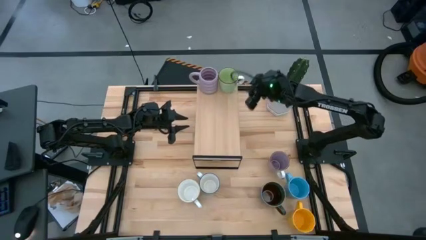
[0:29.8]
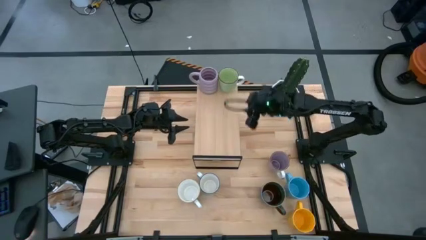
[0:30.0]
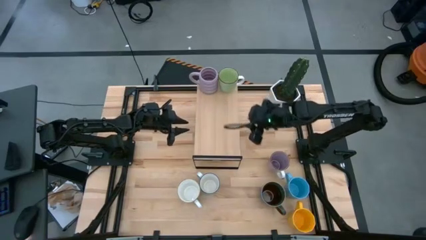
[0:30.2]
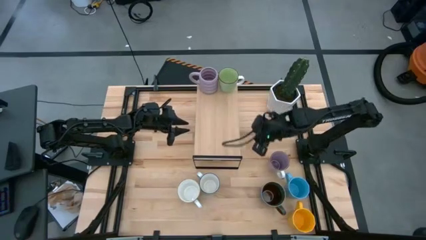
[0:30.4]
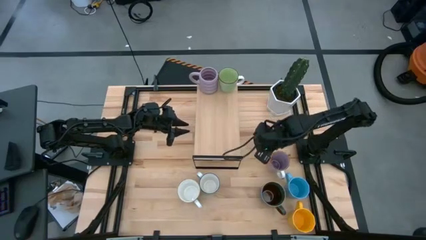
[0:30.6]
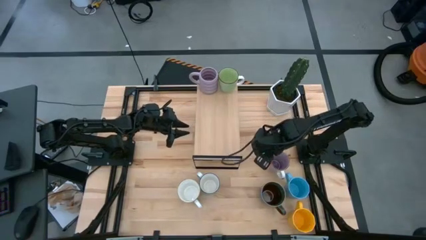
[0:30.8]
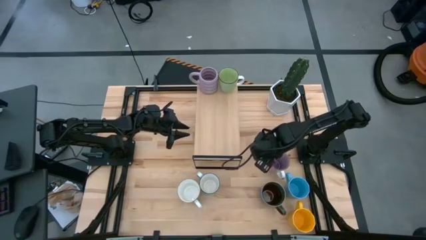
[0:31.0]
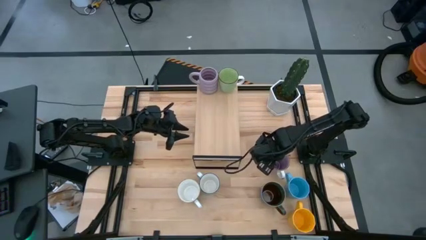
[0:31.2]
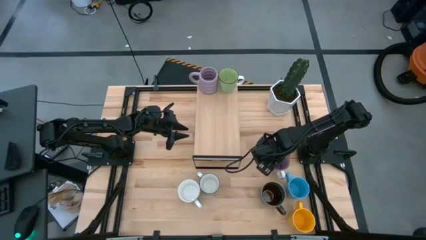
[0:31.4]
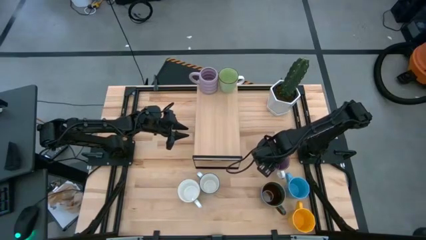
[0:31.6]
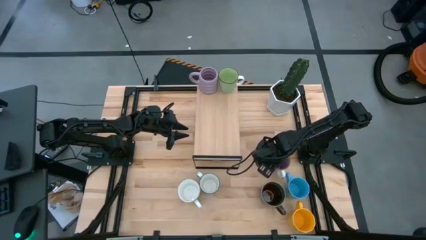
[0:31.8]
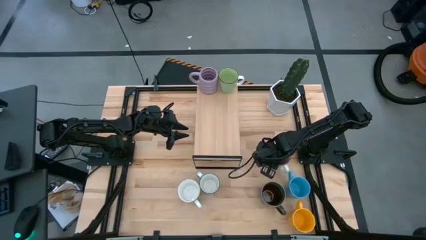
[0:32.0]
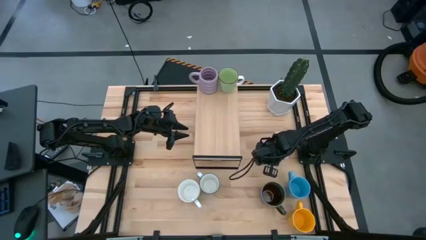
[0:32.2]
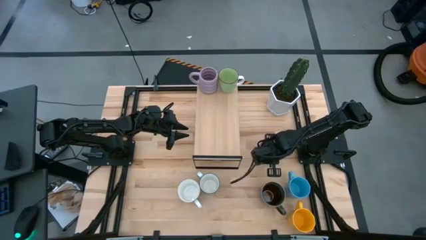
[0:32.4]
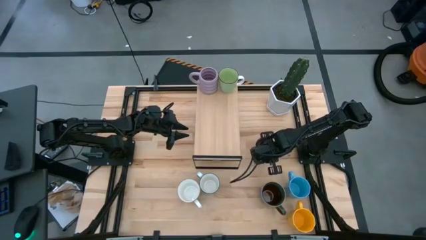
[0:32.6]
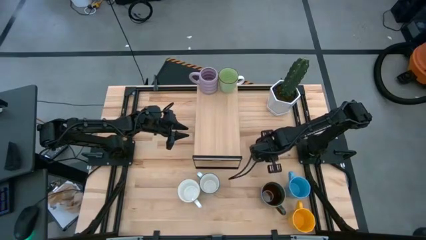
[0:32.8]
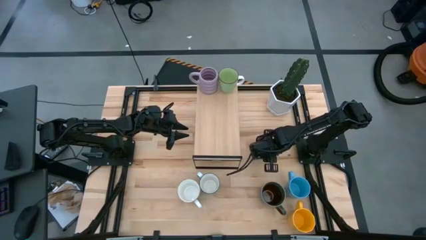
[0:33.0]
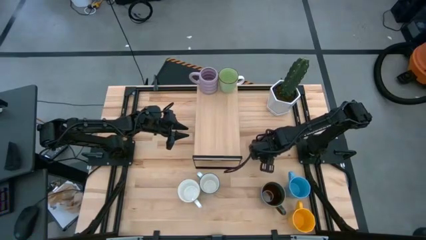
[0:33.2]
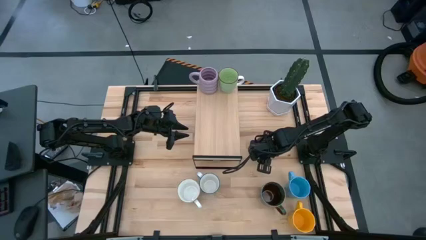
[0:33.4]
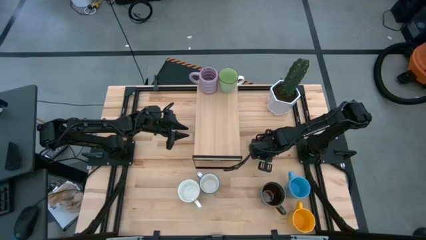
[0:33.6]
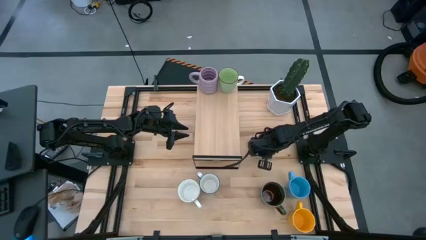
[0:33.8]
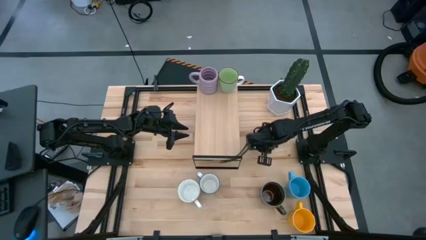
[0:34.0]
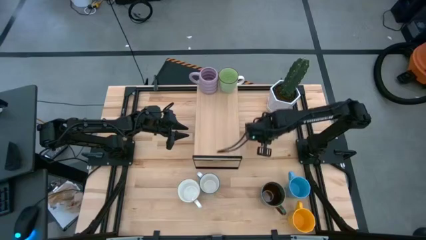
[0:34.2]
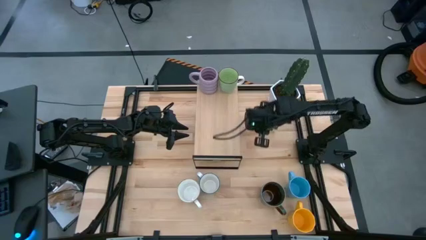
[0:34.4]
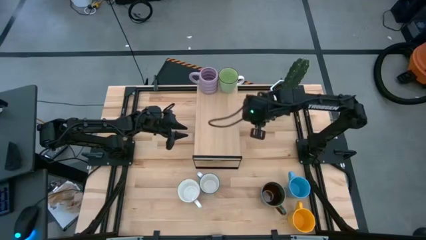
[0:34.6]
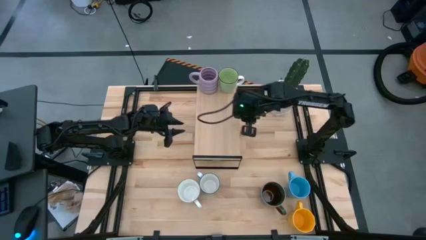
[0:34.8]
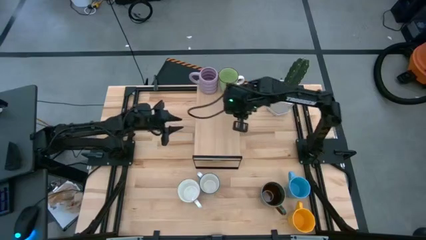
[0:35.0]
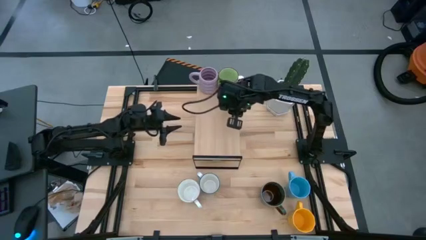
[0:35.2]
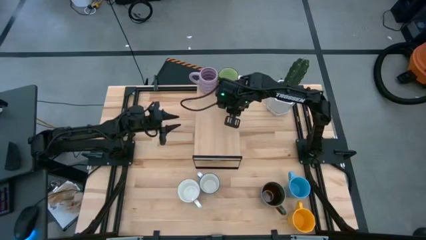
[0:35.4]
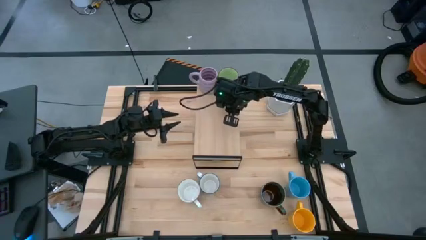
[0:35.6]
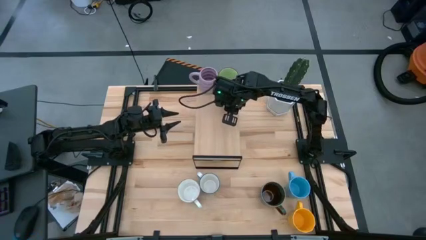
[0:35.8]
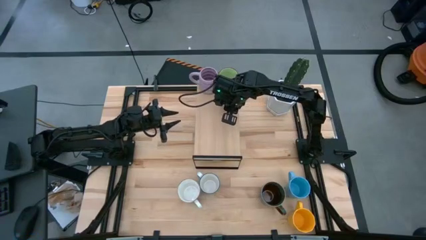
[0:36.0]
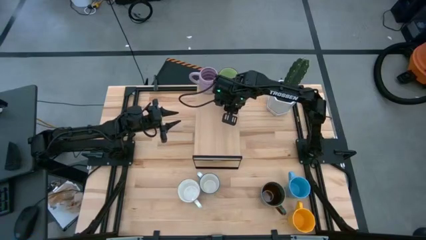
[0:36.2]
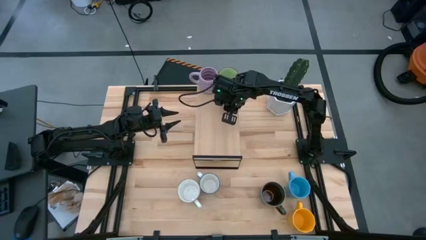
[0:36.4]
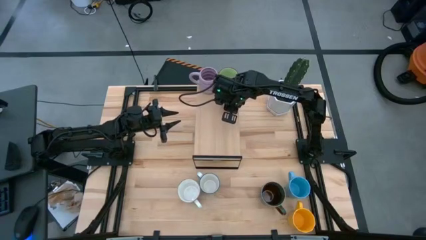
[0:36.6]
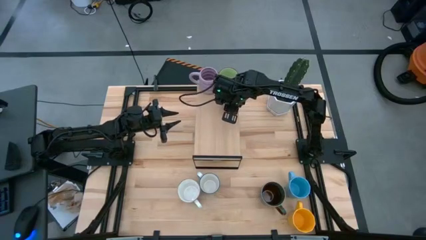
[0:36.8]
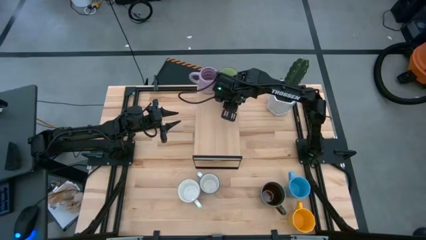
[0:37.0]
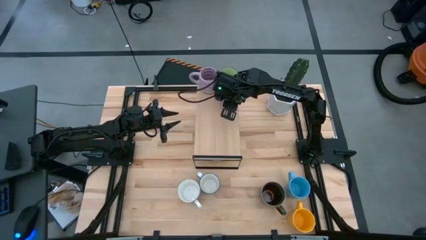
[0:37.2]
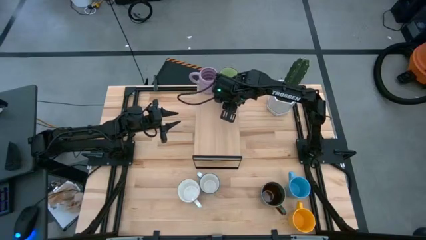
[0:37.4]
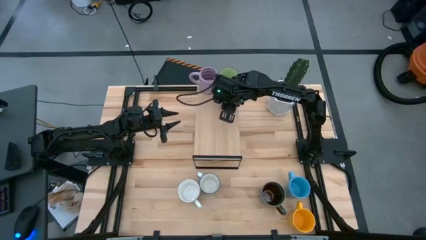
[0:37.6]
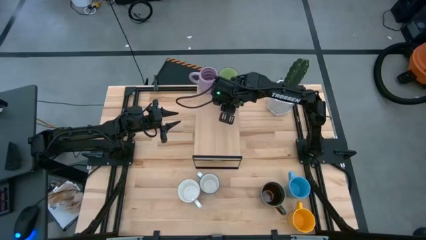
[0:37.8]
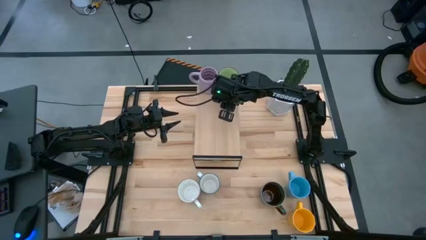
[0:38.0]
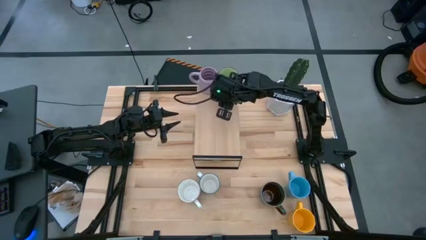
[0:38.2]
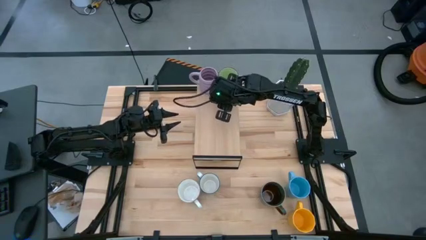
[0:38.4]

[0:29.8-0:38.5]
Task: Place coffee mugs
Put the violet mug on the shelf

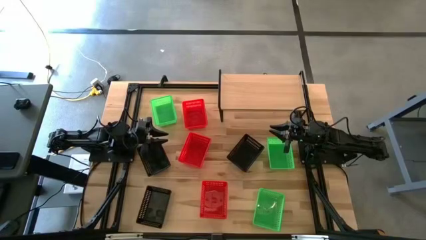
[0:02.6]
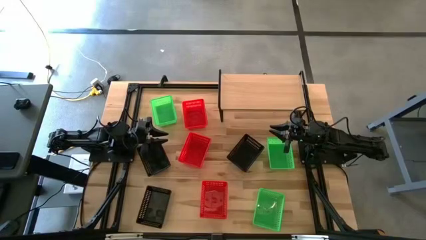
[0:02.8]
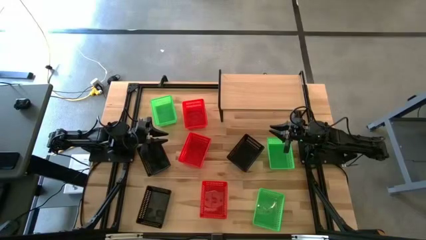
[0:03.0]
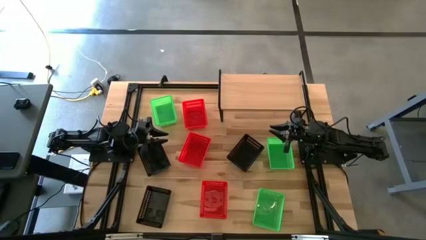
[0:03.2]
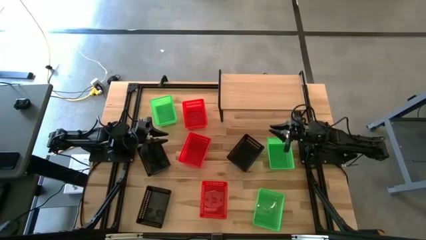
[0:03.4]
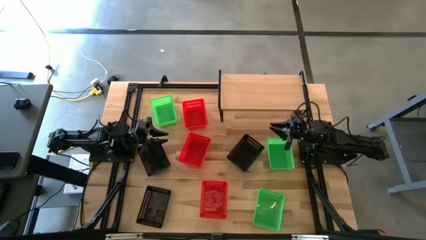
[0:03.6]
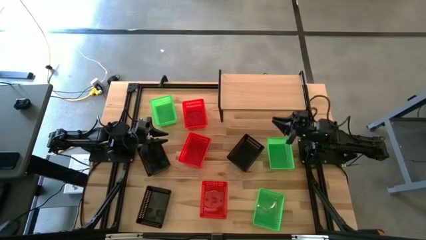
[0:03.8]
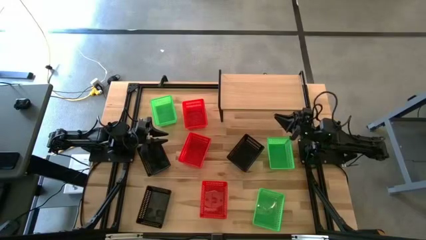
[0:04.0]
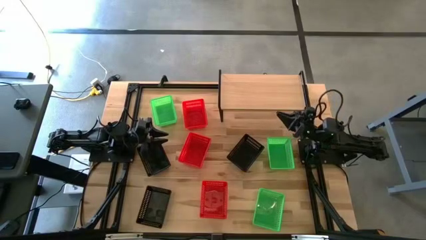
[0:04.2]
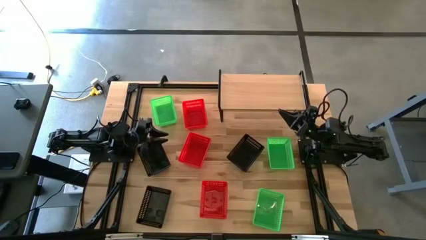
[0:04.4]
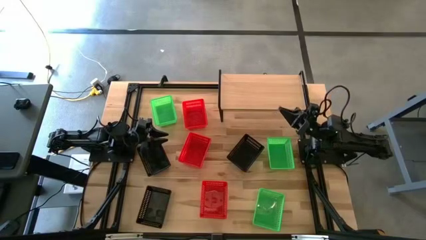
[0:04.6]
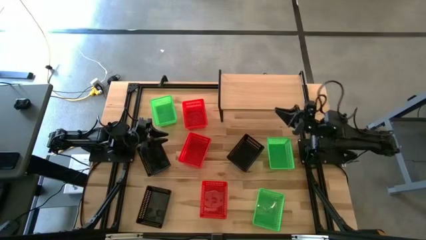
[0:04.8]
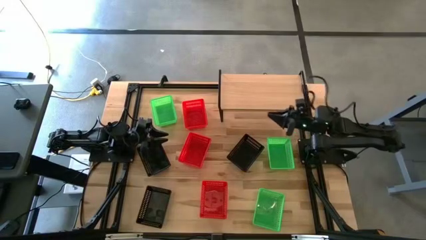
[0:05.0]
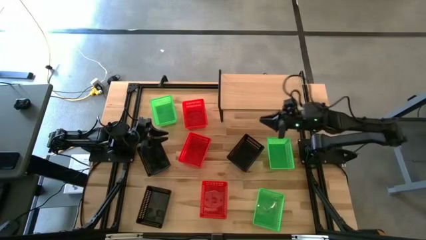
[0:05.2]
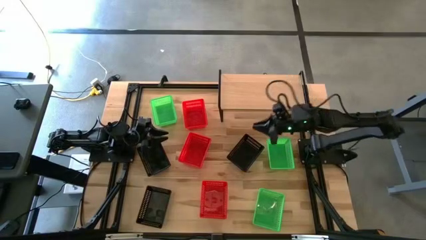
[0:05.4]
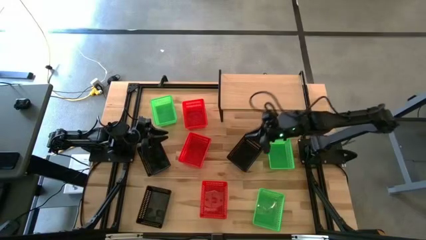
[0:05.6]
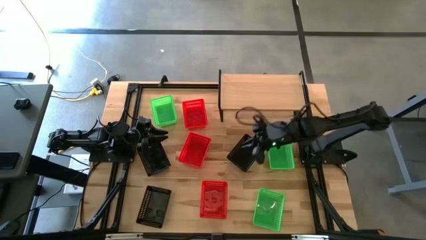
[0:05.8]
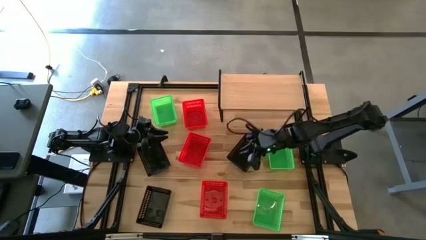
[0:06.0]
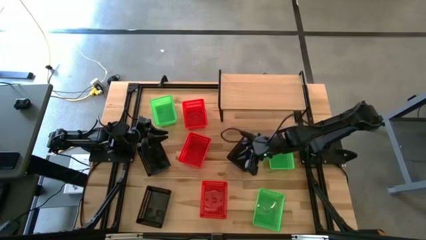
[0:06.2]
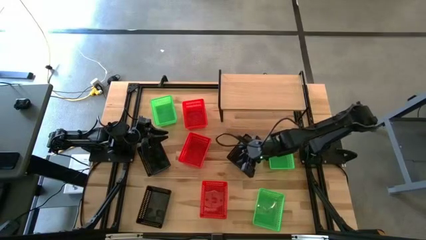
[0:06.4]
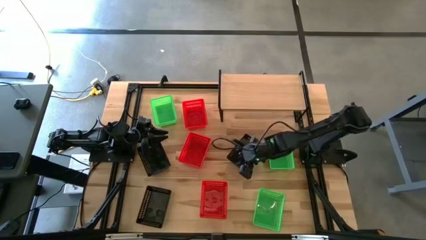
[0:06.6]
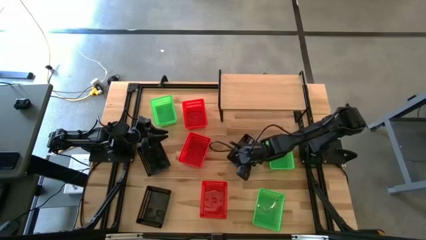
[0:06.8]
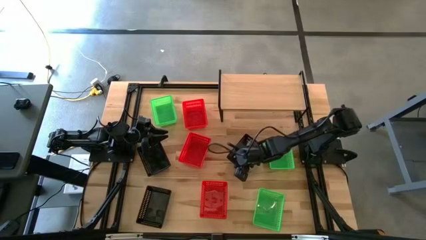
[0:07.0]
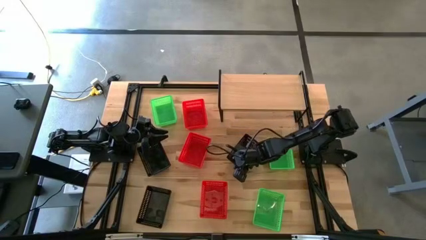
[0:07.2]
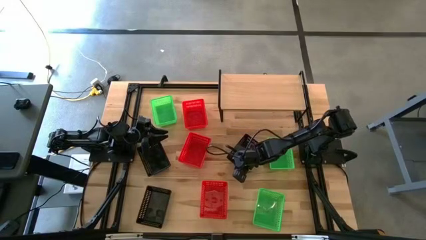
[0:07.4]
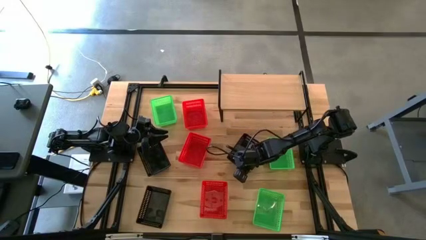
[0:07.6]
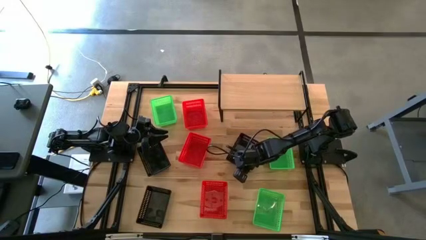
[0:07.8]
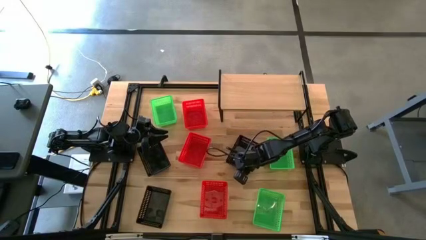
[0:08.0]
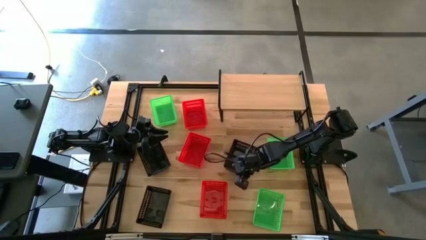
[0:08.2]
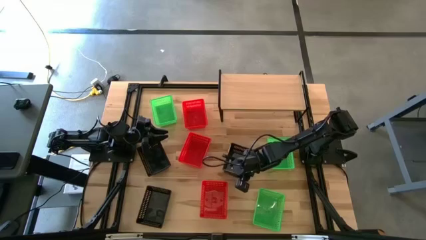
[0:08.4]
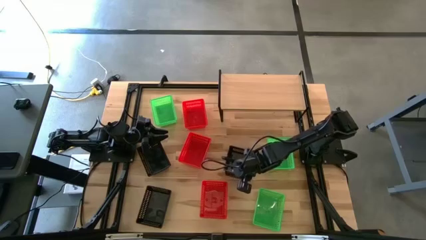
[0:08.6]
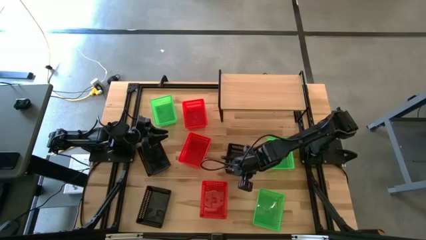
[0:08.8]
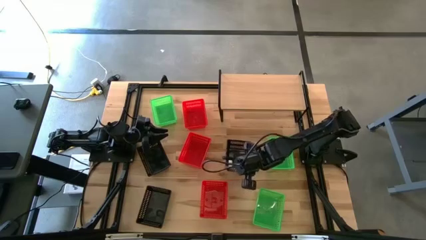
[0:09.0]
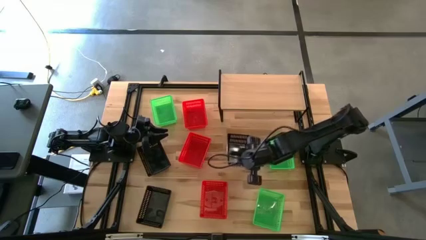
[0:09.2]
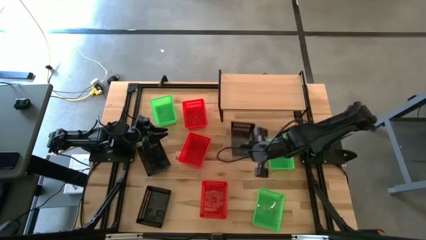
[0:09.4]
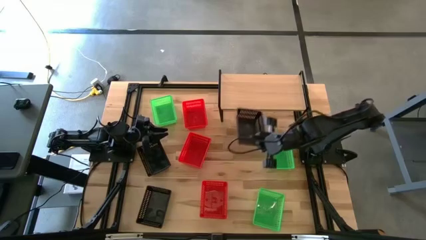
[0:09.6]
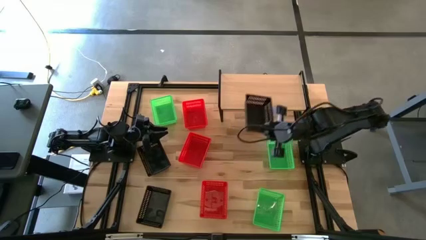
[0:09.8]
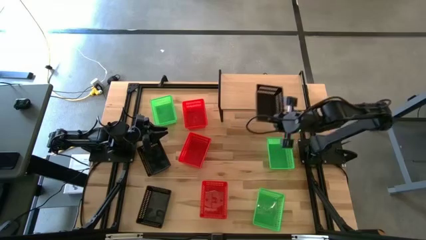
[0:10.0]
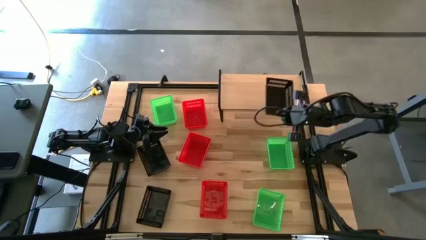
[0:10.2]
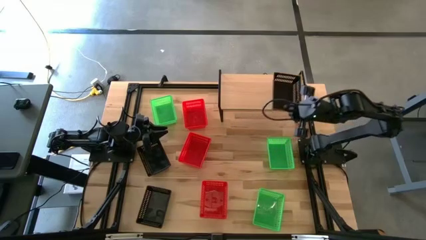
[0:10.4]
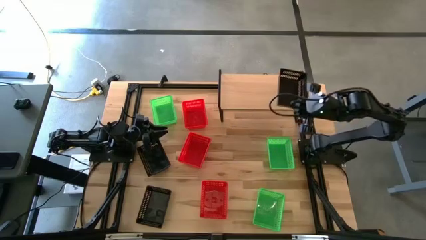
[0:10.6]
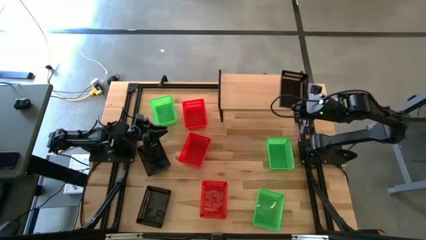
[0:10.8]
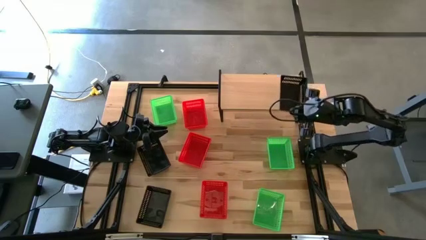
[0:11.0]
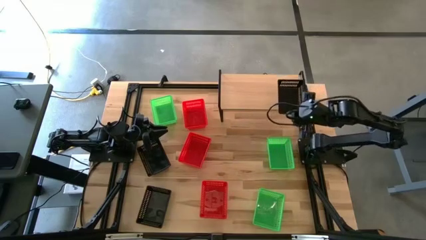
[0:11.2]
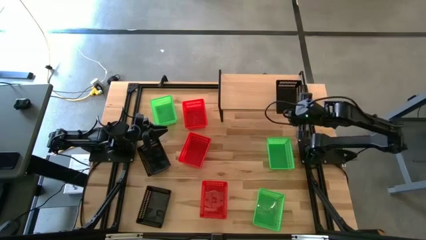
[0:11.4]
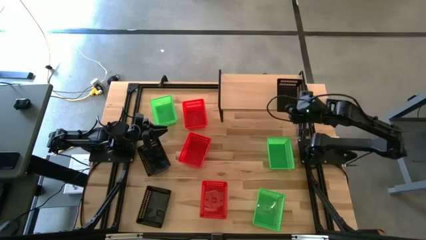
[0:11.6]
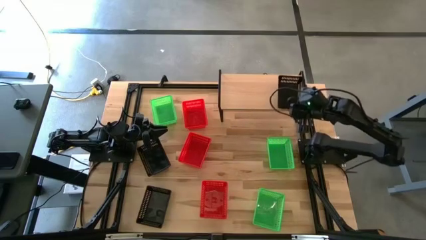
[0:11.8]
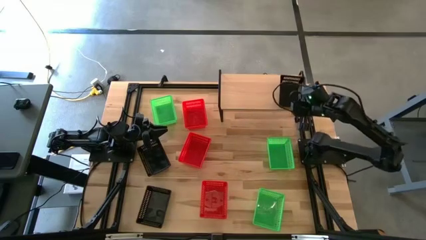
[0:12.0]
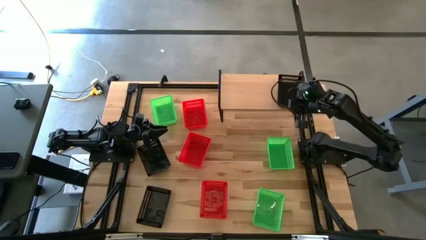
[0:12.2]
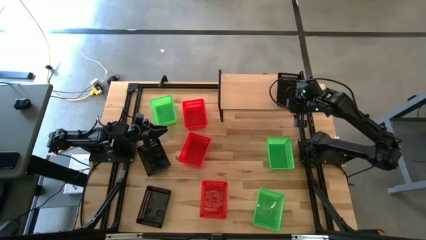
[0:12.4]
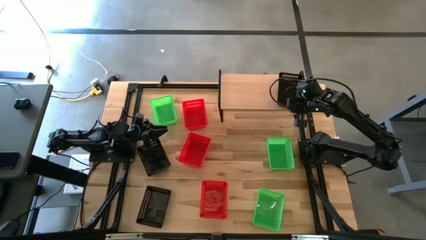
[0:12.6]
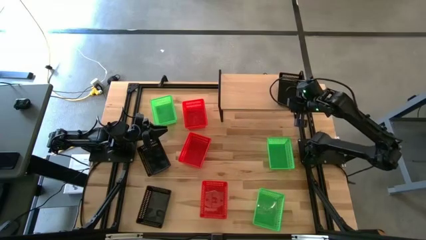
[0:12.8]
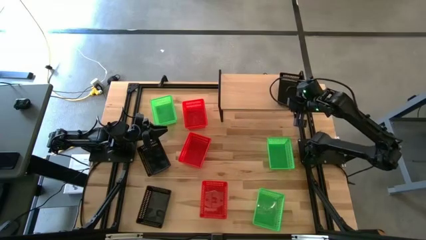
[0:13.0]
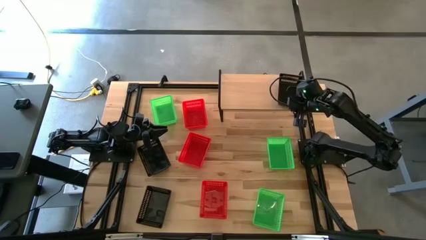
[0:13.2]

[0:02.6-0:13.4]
Task: Stack baskets on shelf by color
Put the top right black bin on the shelf
